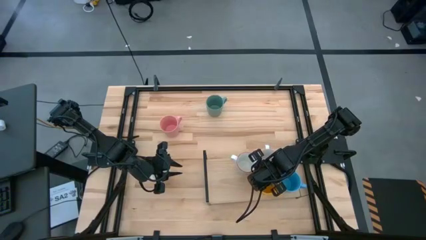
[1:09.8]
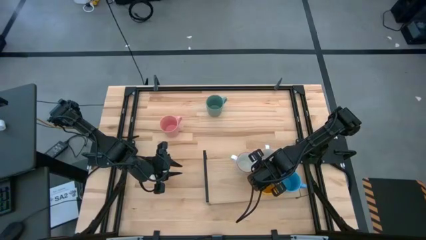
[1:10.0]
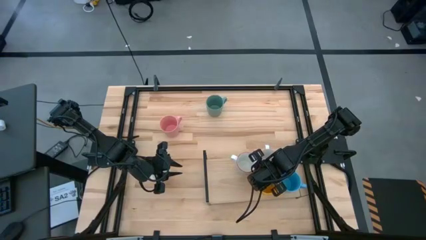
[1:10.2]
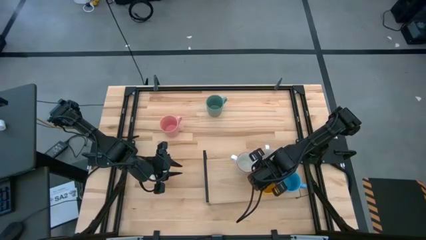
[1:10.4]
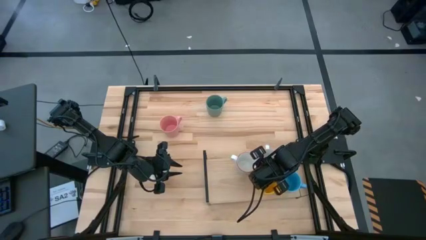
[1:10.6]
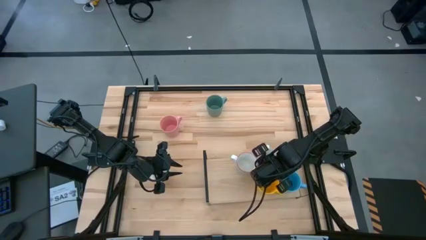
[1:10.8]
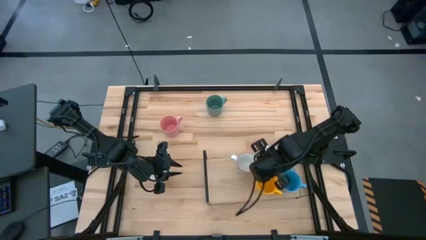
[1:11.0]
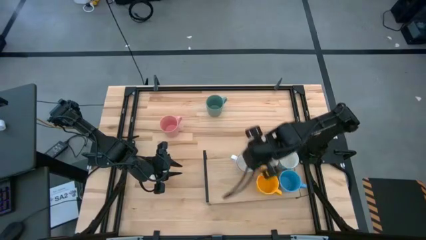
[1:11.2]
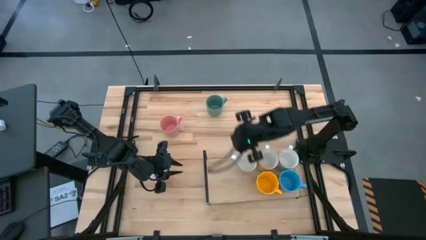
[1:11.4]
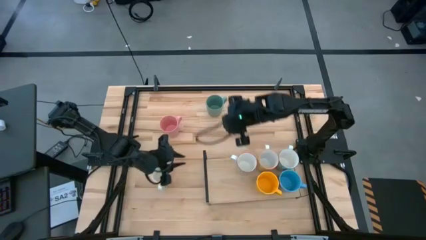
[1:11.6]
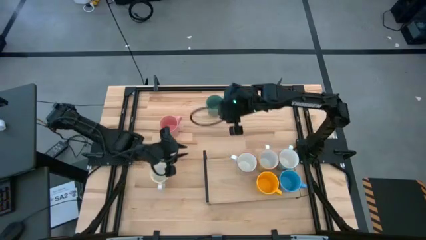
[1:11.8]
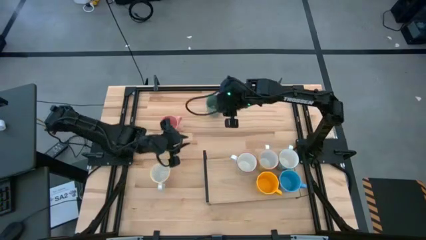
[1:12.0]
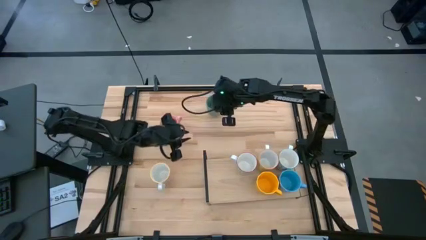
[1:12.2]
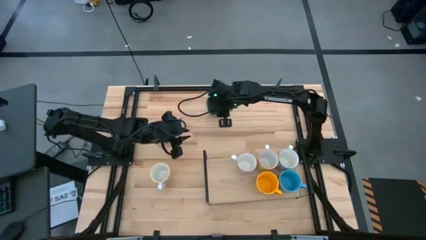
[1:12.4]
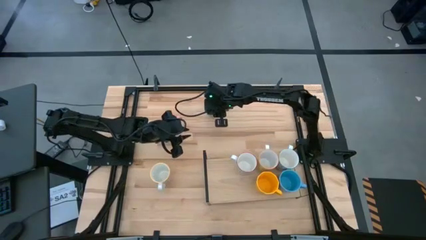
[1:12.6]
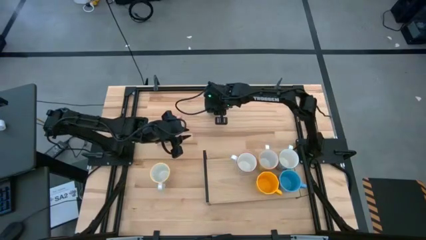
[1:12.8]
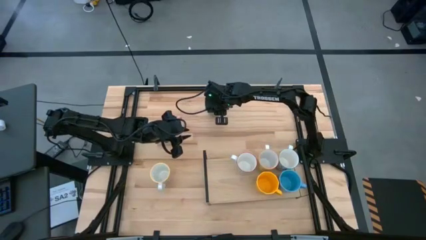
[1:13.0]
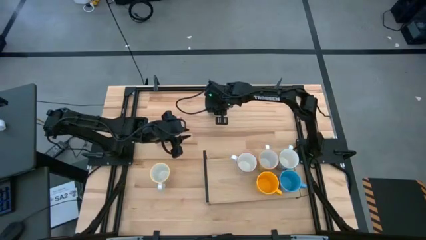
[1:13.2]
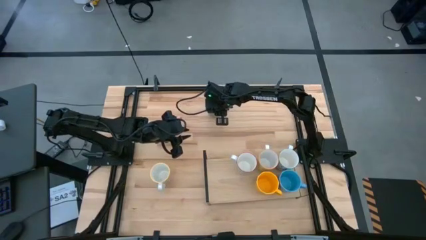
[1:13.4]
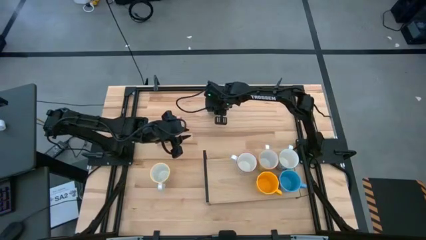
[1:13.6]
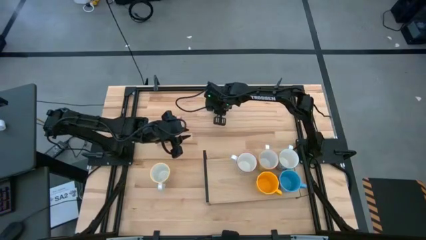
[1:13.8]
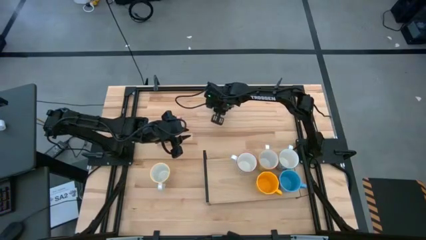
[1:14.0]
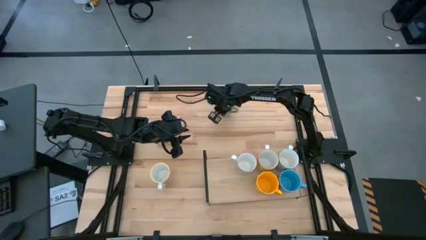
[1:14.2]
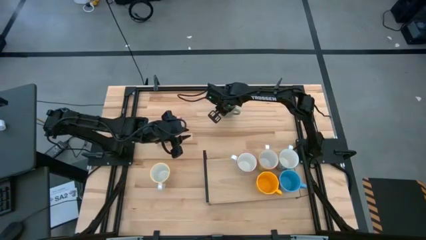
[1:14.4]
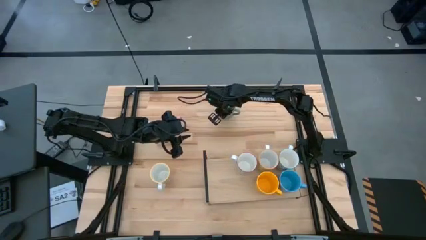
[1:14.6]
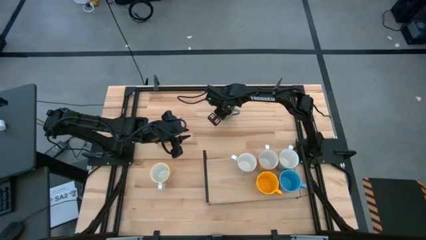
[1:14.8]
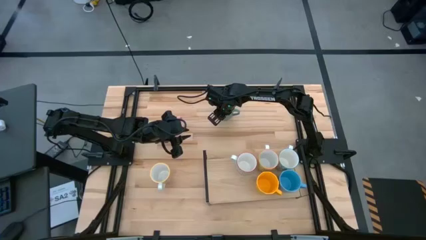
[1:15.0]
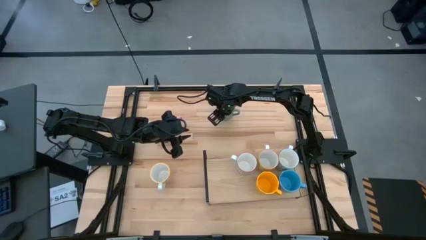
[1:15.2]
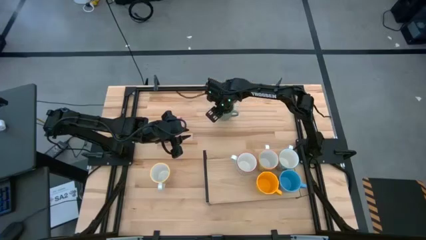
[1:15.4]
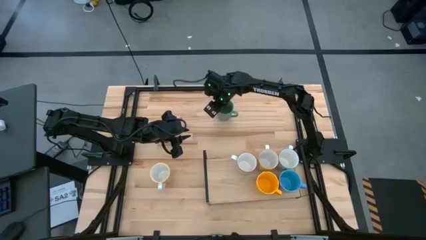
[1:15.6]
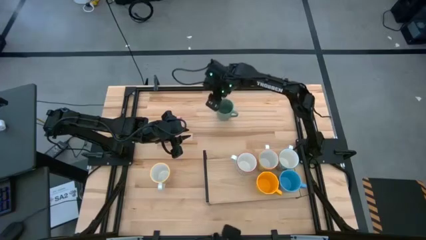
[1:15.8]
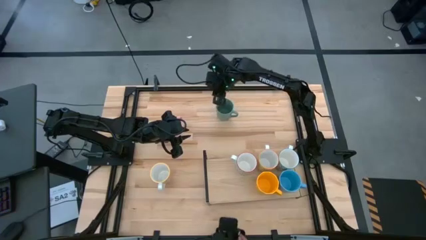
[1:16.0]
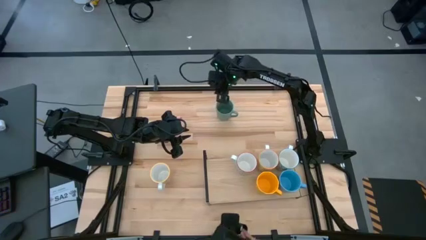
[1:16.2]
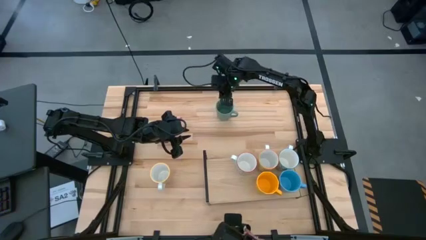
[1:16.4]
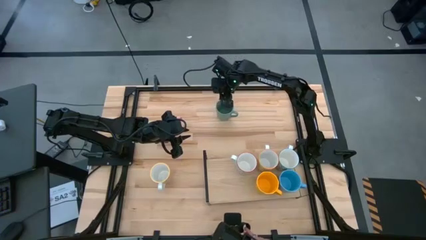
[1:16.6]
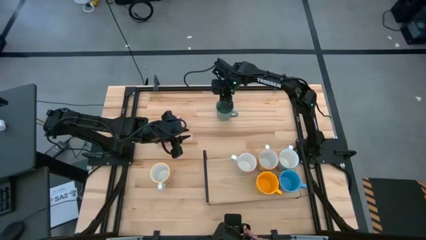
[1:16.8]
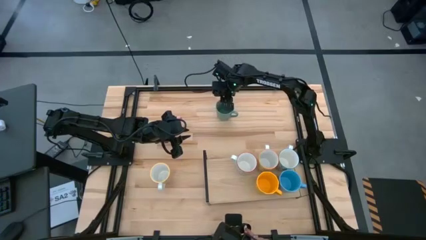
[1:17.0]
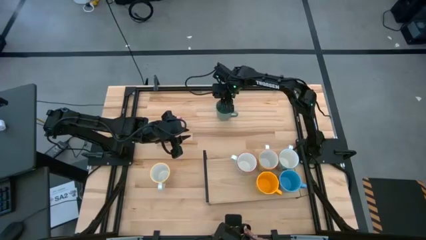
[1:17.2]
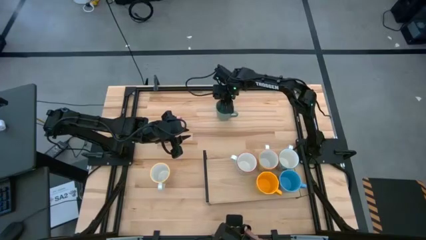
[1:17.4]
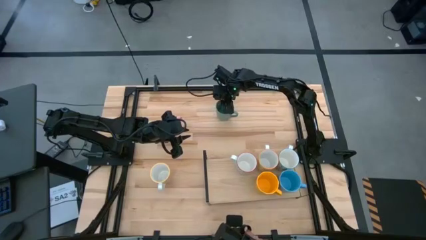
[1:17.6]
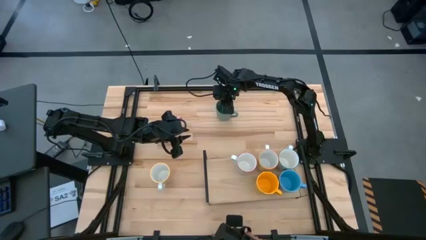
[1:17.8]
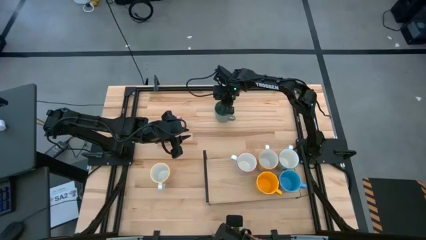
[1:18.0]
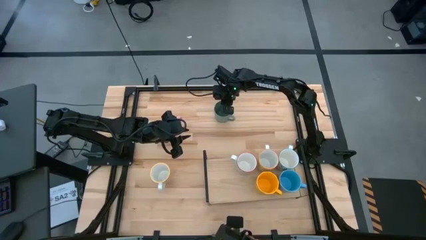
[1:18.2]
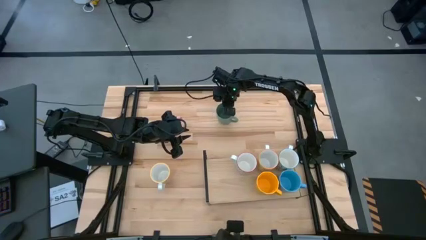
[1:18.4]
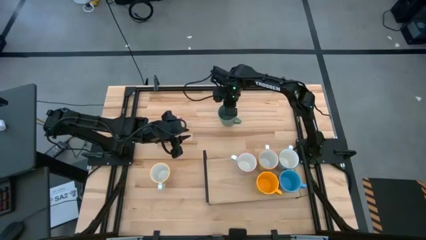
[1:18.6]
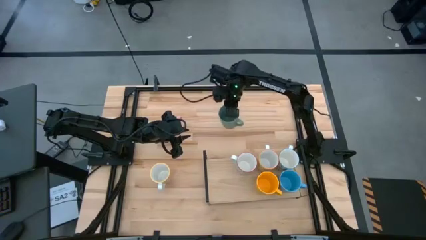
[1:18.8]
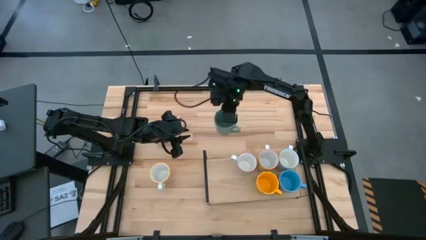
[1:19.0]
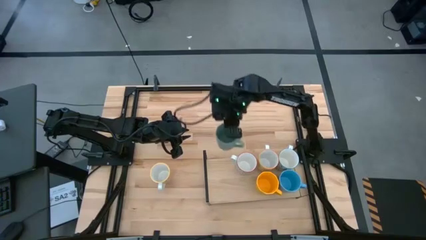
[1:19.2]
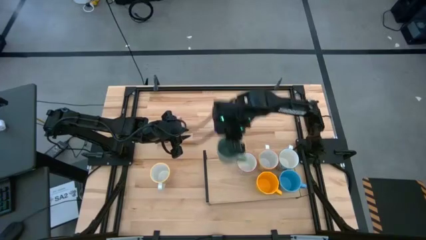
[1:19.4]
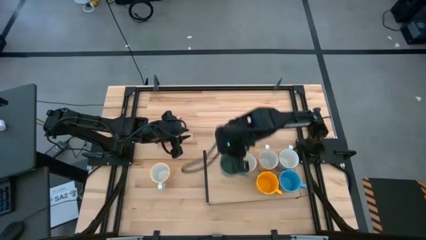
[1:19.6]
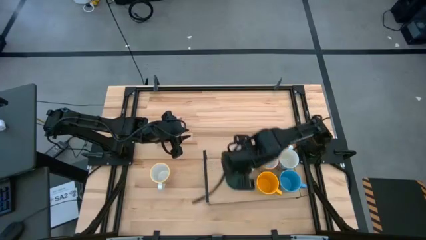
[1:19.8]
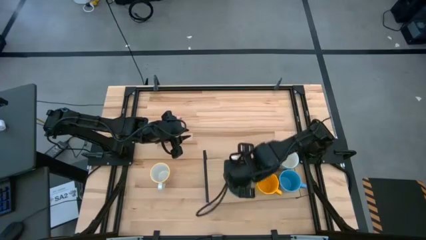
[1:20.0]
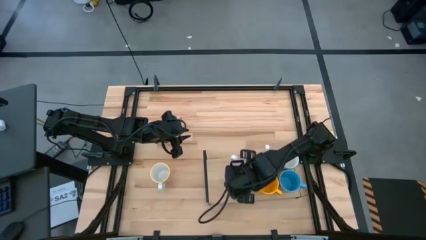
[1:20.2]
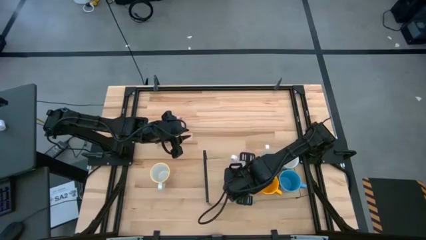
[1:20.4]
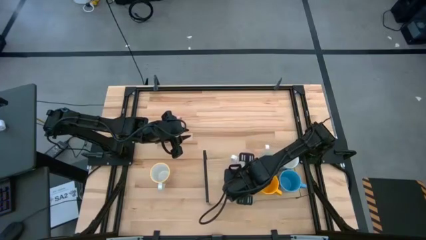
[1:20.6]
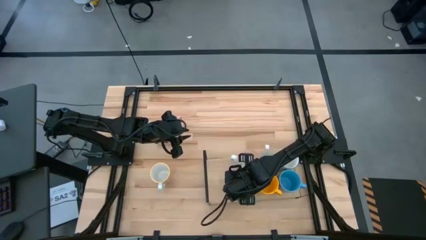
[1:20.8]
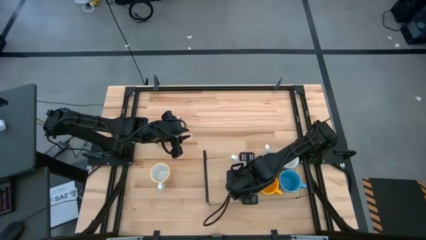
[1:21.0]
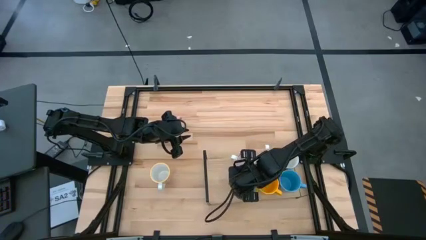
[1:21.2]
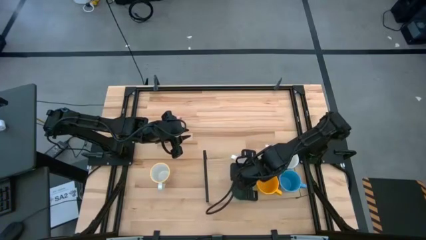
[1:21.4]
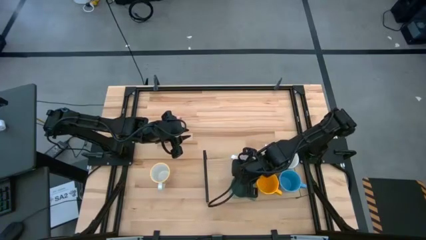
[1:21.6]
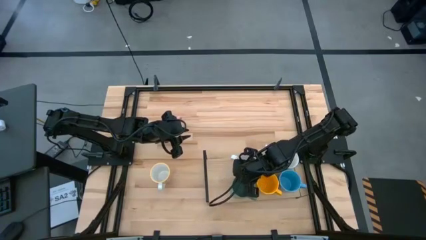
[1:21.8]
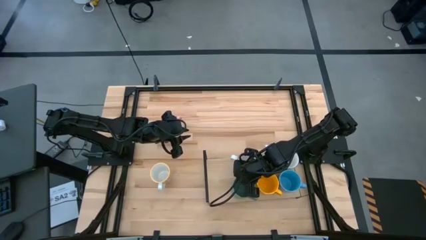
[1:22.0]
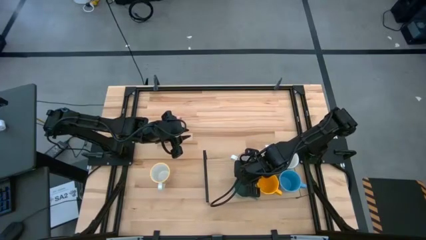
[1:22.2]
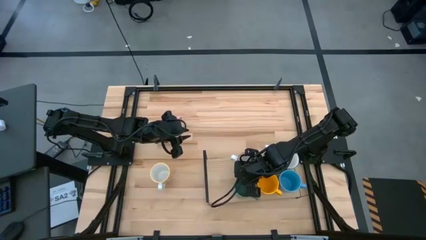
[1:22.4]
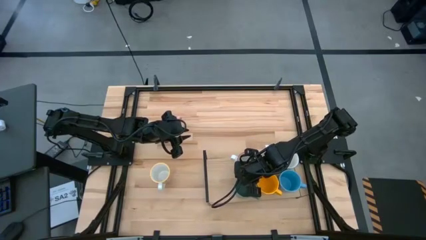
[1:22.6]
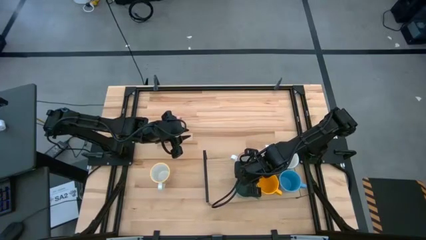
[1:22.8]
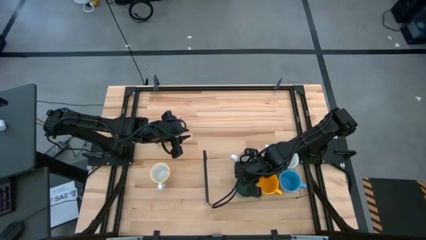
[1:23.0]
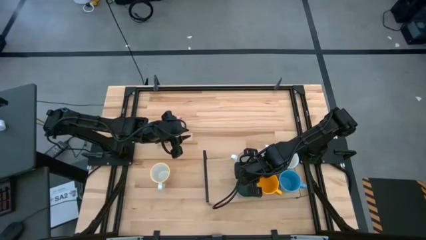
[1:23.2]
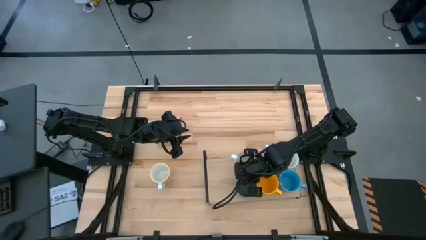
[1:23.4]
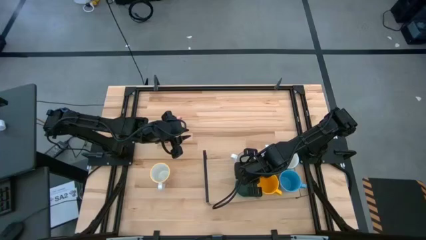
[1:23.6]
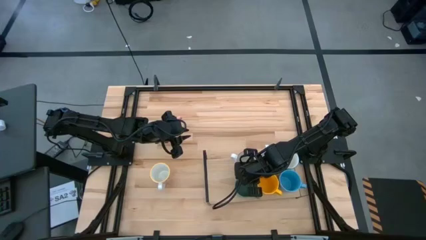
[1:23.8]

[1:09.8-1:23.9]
Task: Place coffee mugs
Put the green mug on the shelf

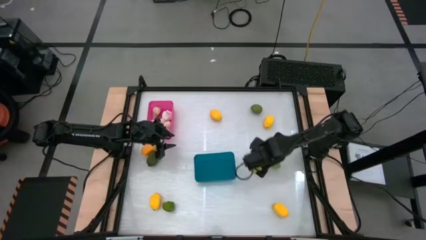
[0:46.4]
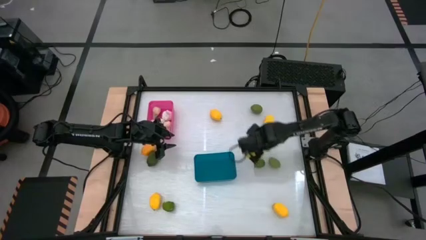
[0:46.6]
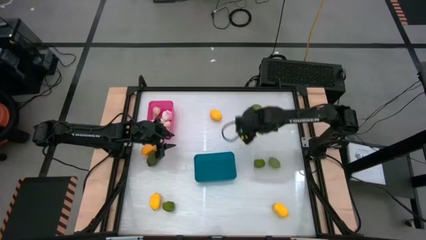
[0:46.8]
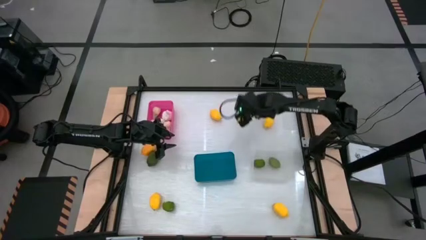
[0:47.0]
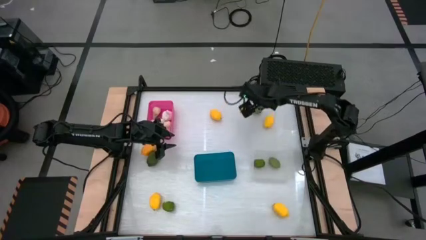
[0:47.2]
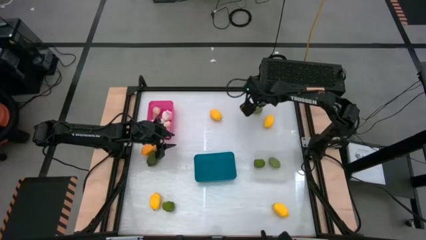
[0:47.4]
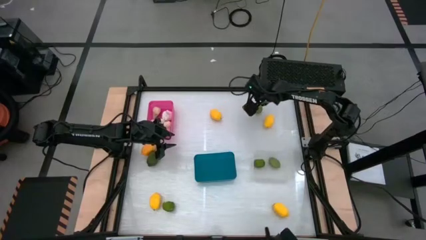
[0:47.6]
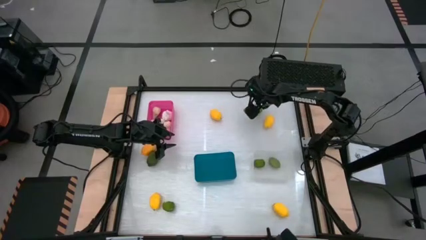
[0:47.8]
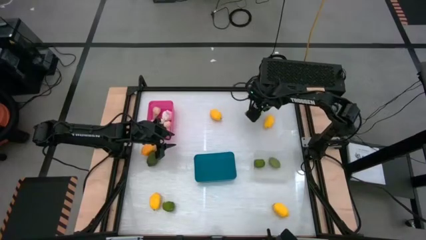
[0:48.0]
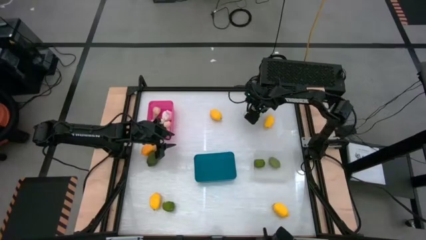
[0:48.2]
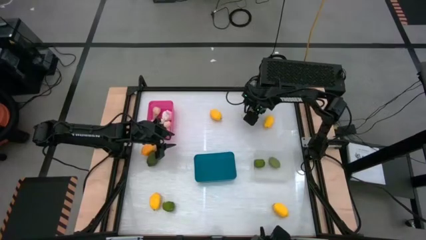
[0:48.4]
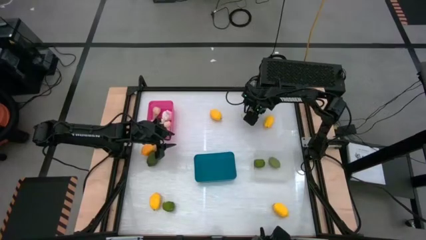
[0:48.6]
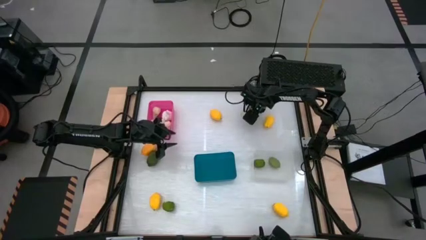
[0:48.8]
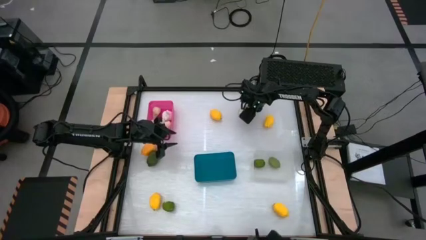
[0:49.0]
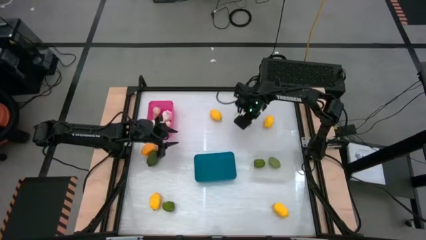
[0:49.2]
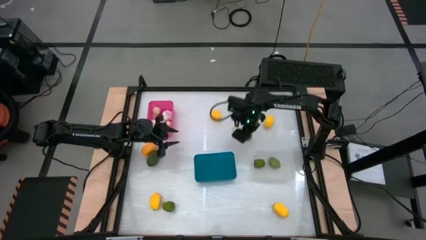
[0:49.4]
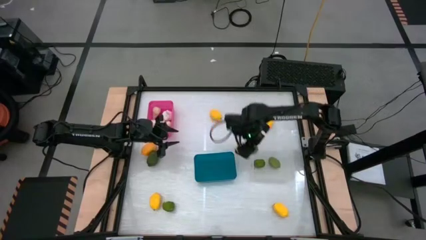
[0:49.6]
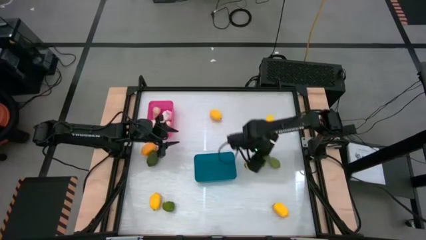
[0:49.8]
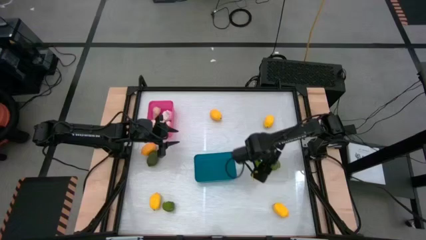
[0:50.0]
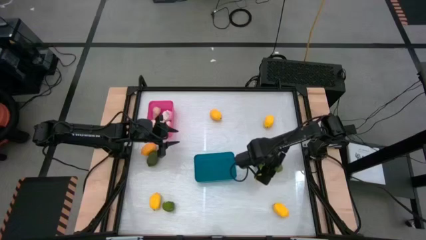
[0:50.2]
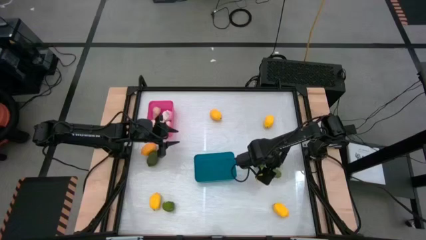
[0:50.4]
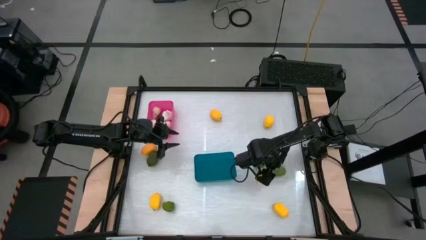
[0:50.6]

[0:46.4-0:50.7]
Task: Sort produce into baskets
Put the green lime into the white bin
